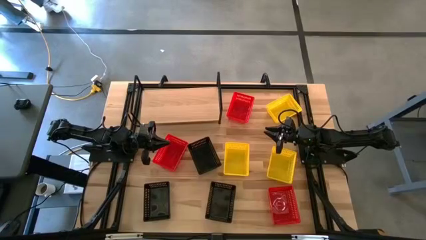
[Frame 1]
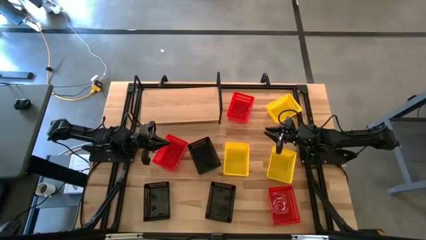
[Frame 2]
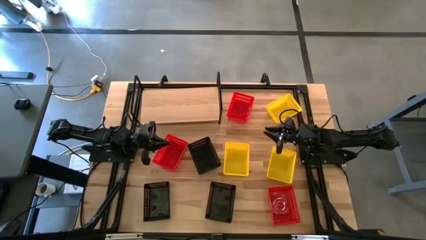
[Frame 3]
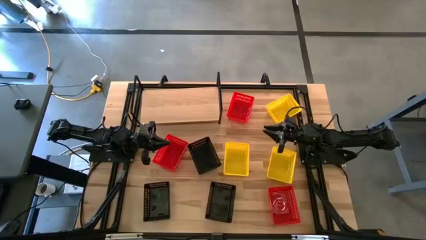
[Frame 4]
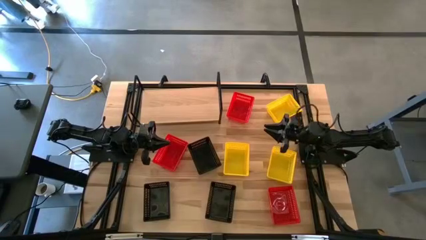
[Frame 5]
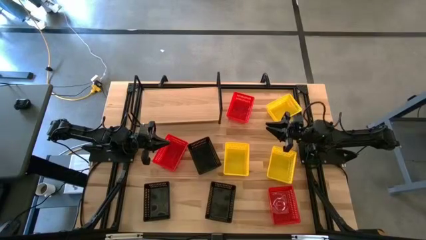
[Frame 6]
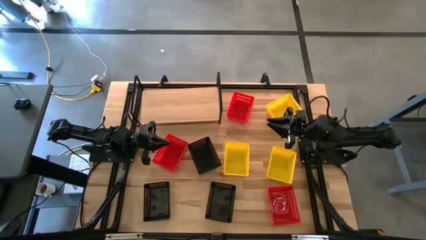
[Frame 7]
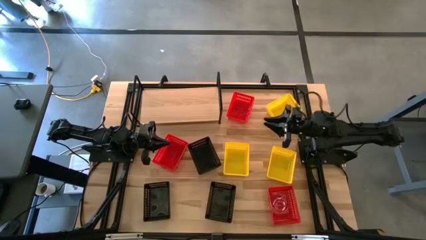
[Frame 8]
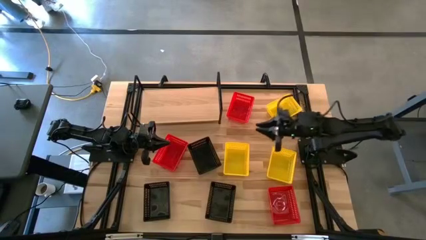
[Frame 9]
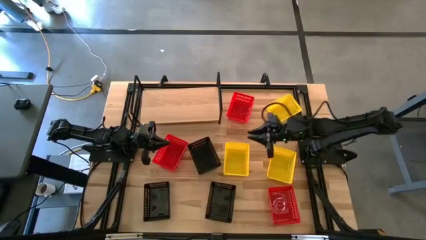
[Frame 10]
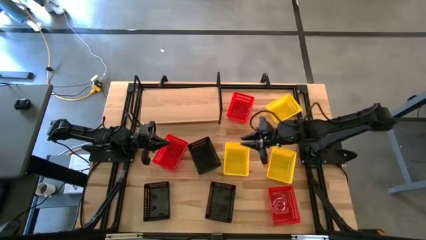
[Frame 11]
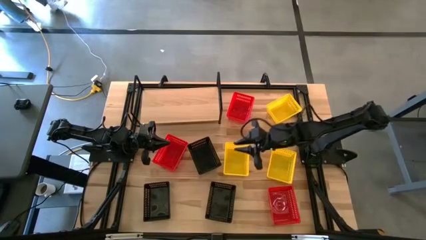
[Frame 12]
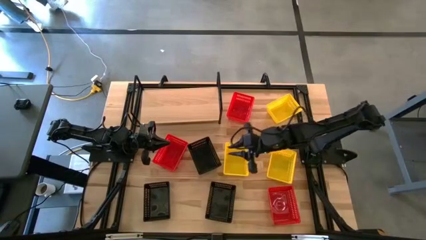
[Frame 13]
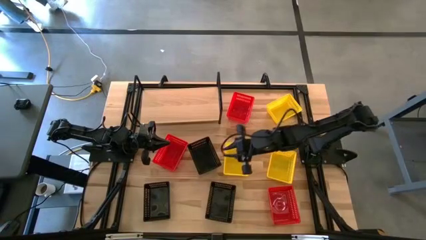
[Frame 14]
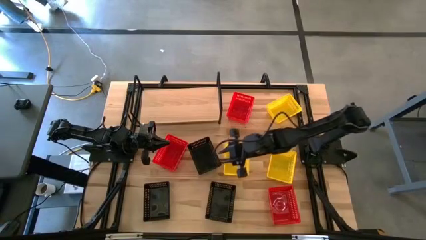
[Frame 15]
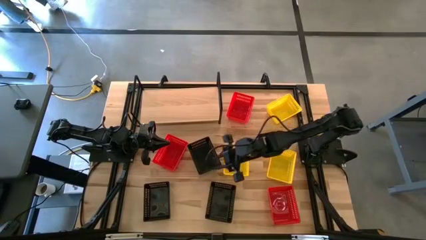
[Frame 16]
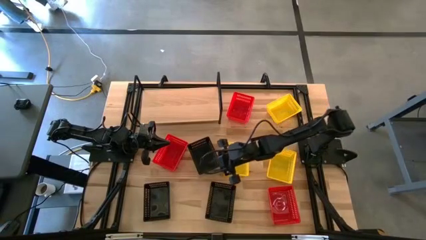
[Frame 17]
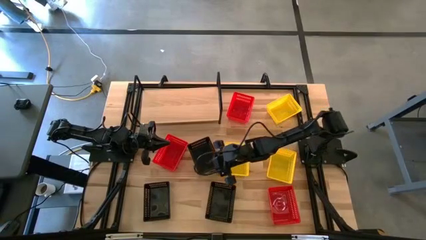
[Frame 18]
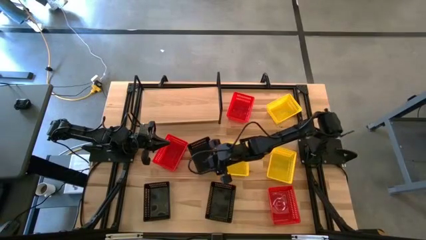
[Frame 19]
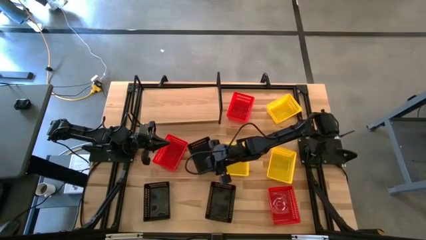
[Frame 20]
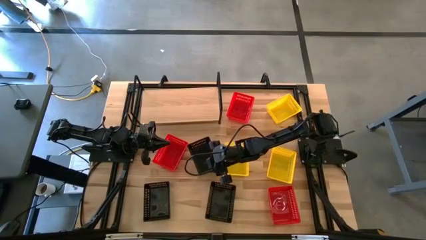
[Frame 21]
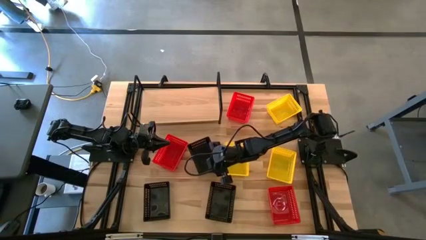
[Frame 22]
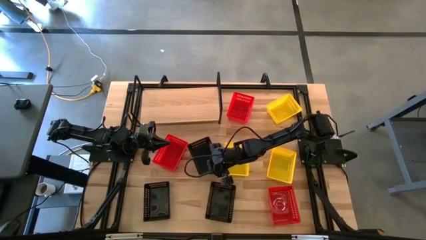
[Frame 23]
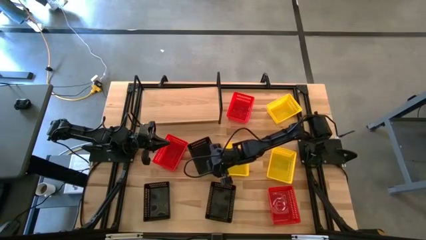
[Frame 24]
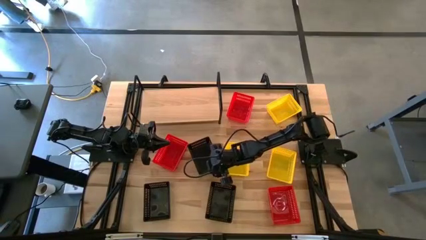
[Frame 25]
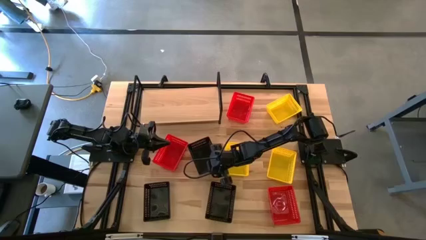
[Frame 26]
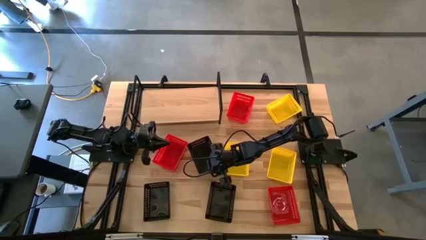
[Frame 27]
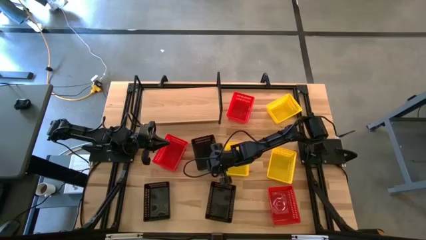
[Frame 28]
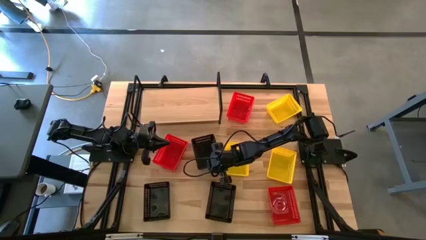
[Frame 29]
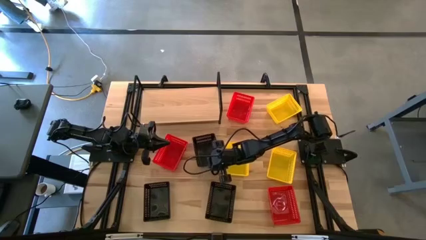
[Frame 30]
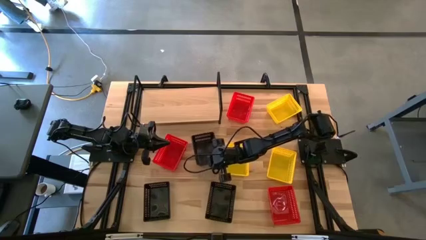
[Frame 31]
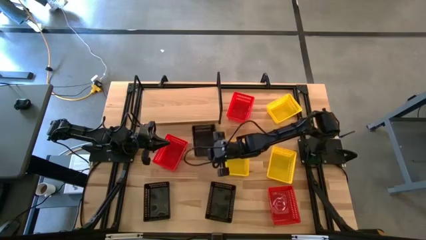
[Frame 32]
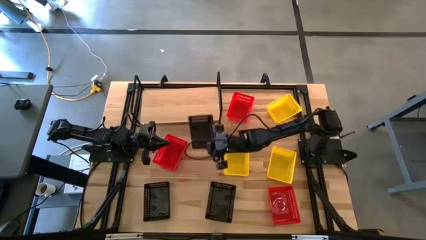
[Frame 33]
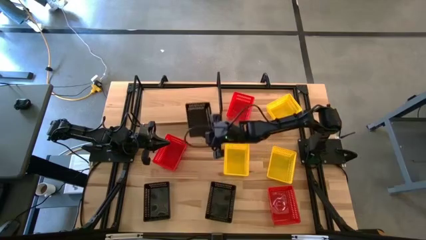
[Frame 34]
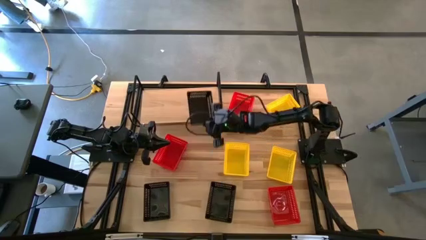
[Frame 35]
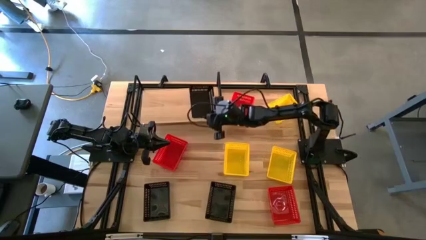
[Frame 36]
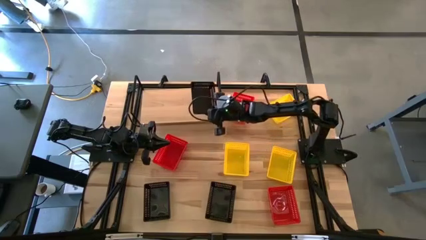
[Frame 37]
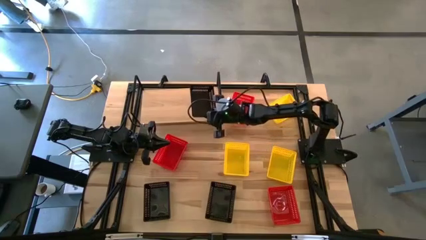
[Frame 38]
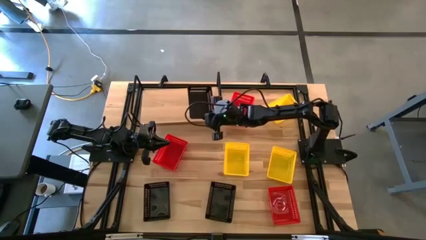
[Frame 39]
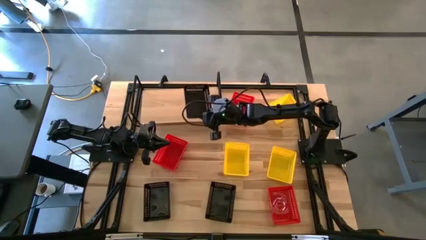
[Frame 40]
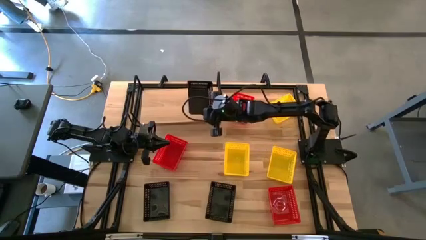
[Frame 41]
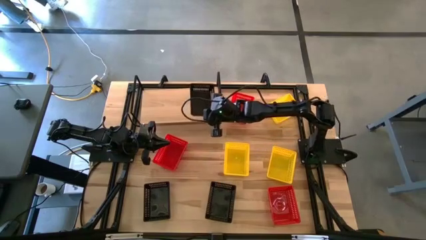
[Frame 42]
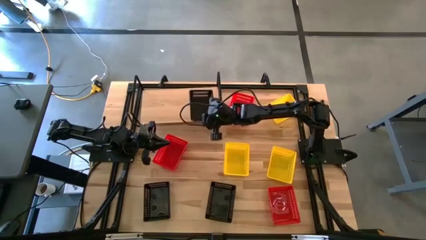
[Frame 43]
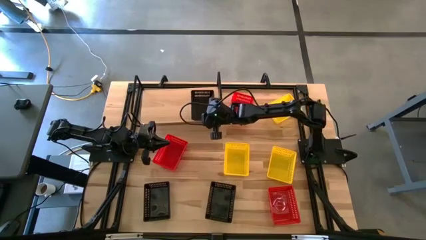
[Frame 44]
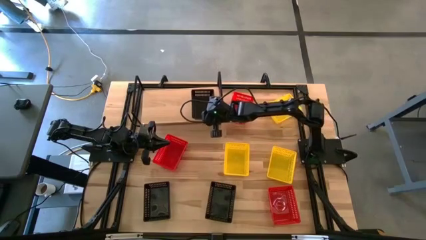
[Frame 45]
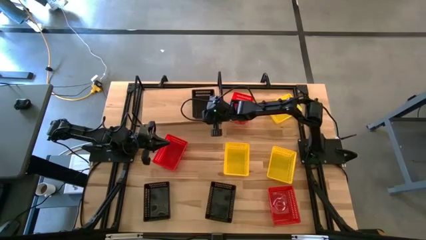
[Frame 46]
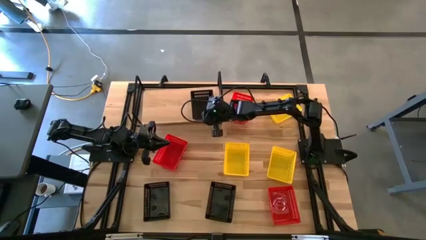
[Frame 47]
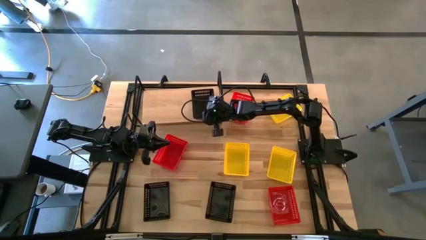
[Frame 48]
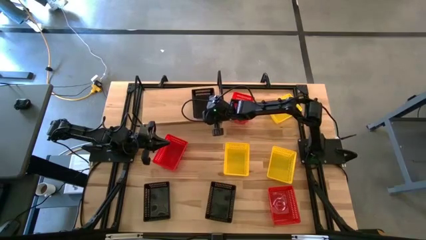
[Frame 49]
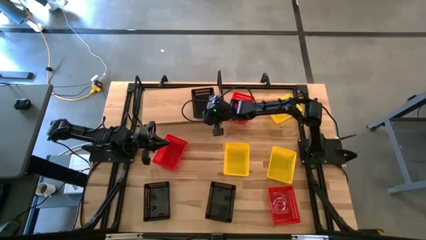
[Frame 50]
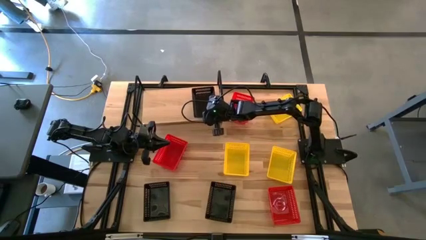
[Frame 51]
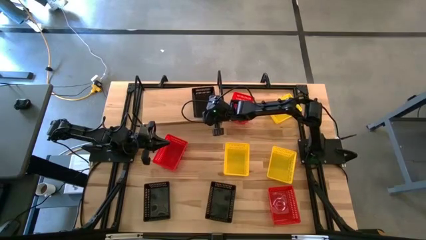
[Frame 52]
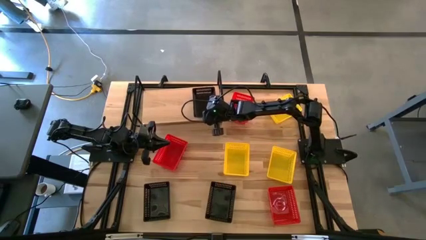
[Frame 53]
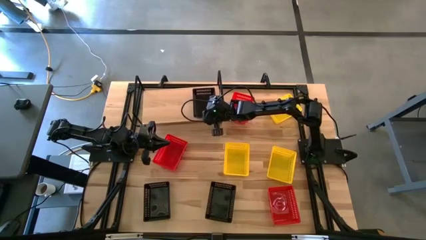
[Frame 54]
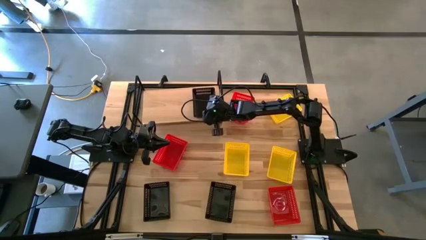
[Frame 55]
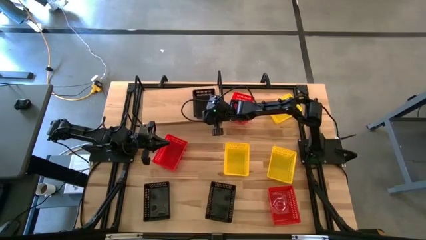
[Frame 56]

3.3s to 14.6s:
Task: Stack baskets on shelf by color
Put the top black bin on the shelf
